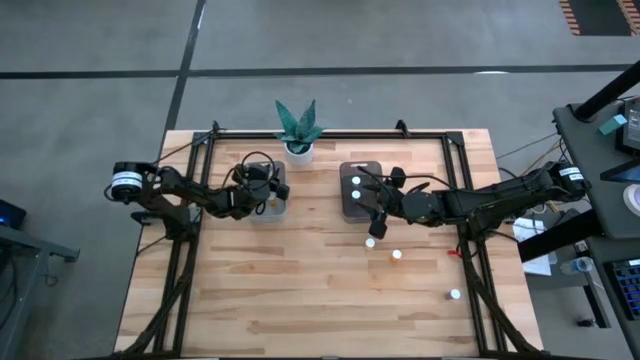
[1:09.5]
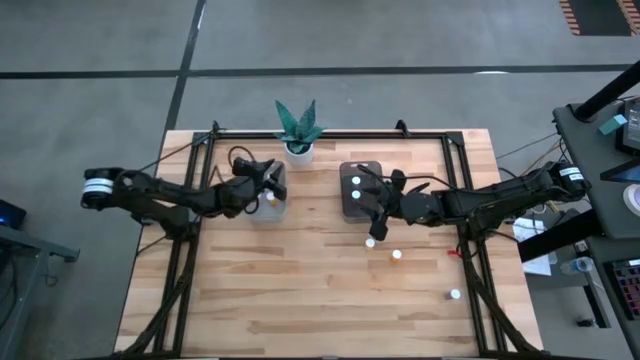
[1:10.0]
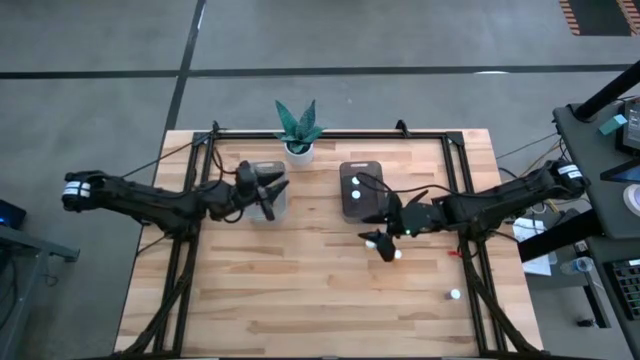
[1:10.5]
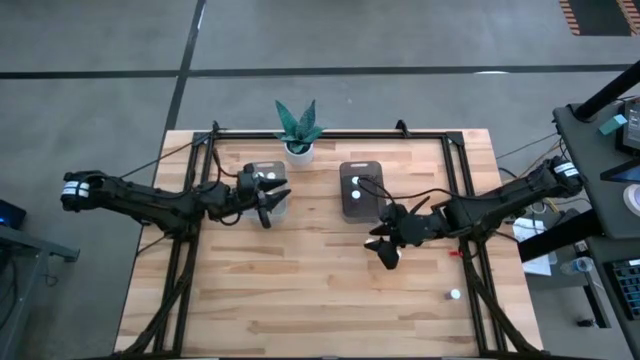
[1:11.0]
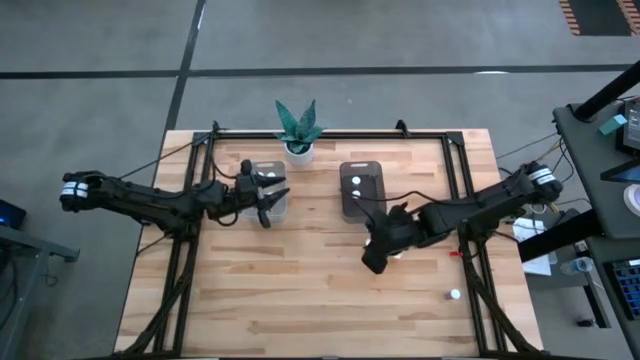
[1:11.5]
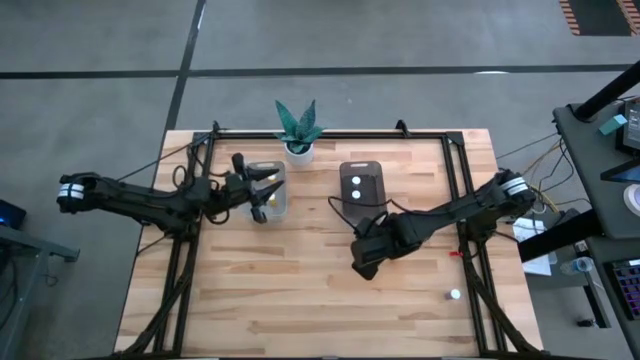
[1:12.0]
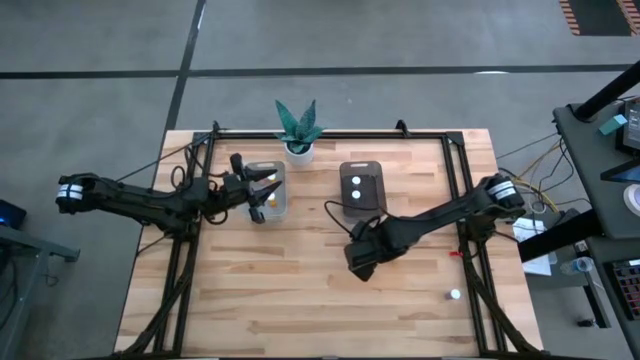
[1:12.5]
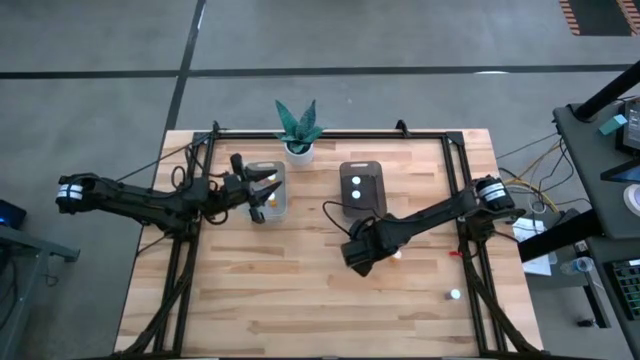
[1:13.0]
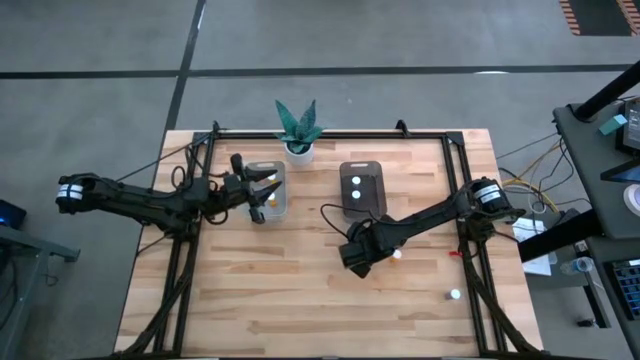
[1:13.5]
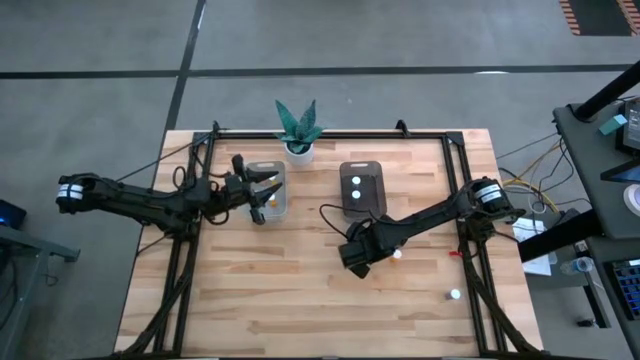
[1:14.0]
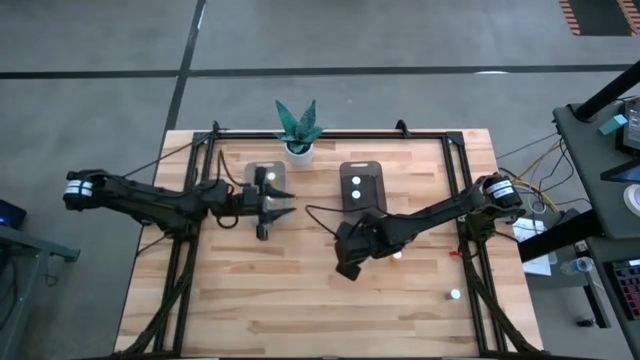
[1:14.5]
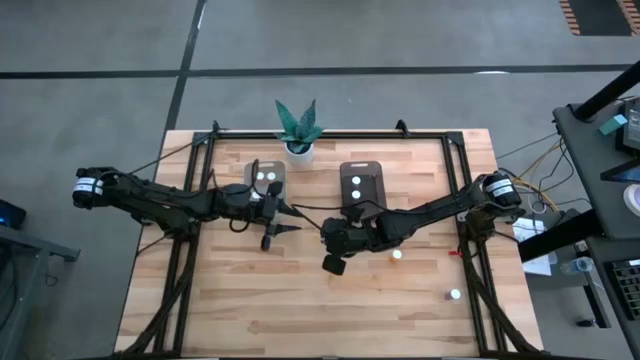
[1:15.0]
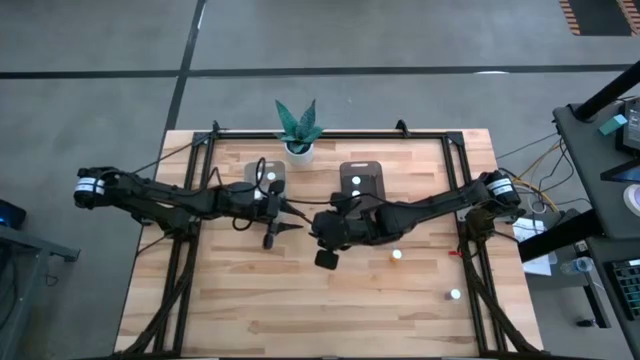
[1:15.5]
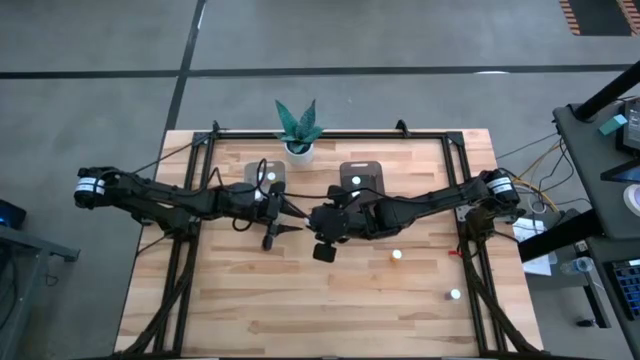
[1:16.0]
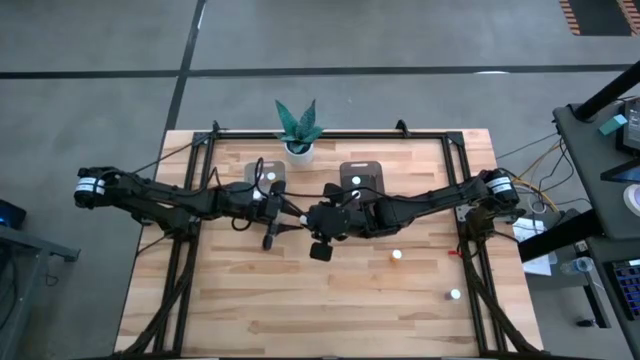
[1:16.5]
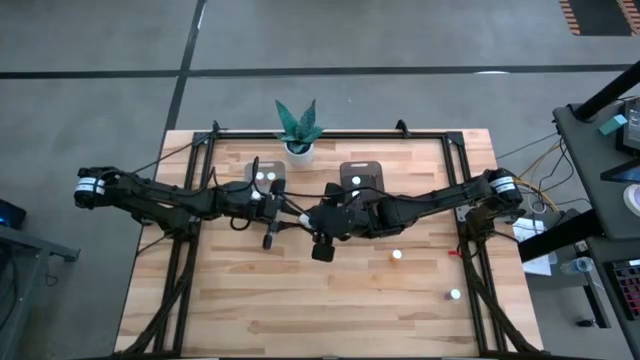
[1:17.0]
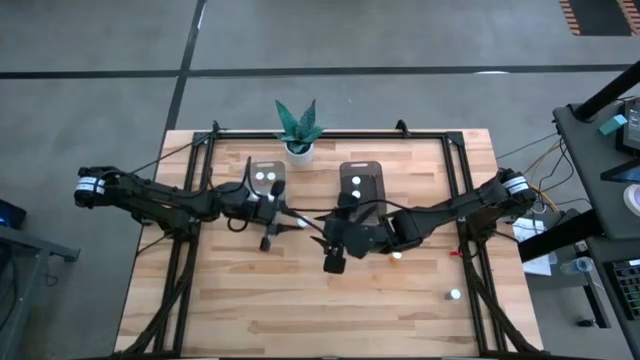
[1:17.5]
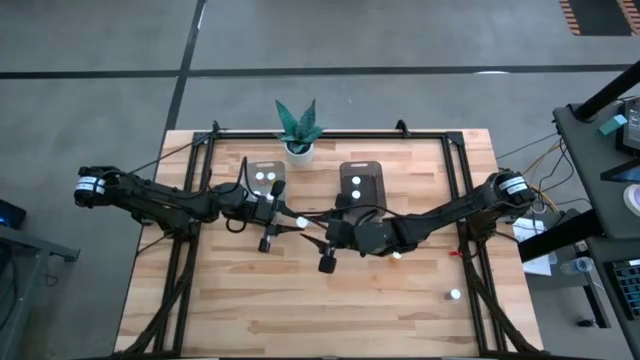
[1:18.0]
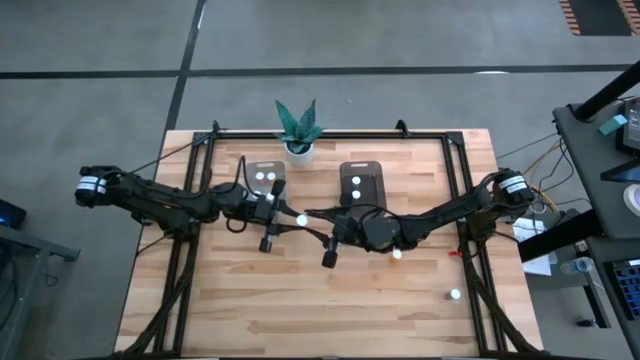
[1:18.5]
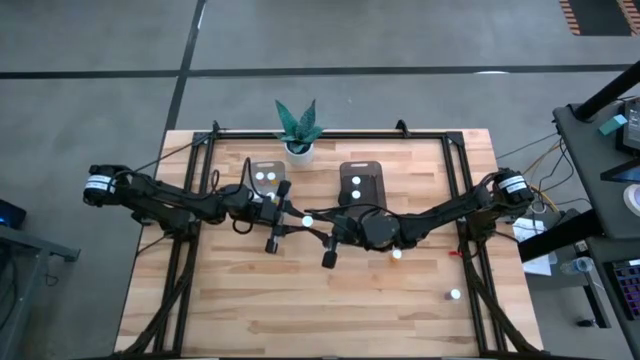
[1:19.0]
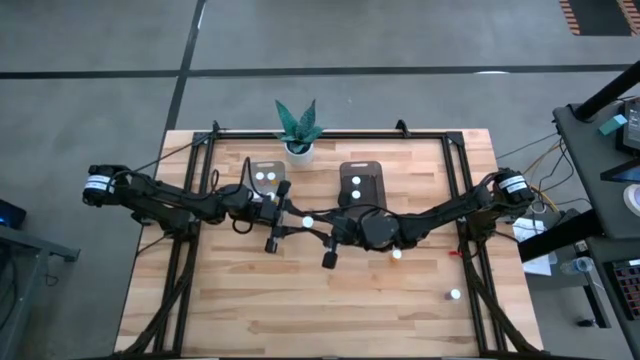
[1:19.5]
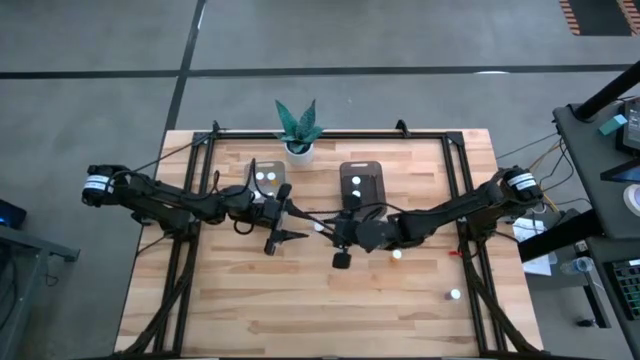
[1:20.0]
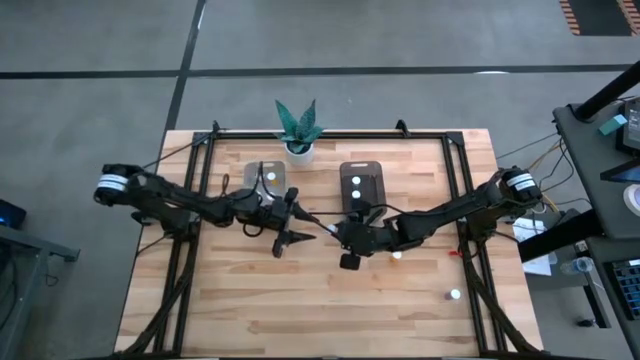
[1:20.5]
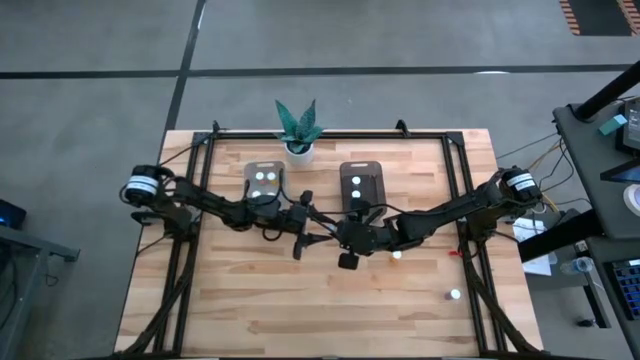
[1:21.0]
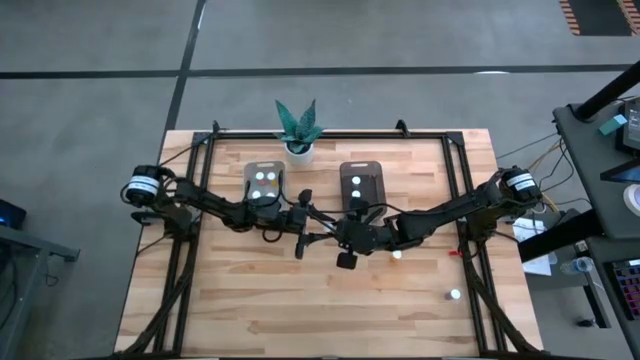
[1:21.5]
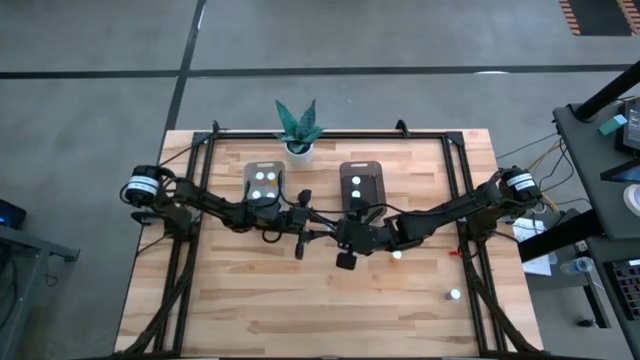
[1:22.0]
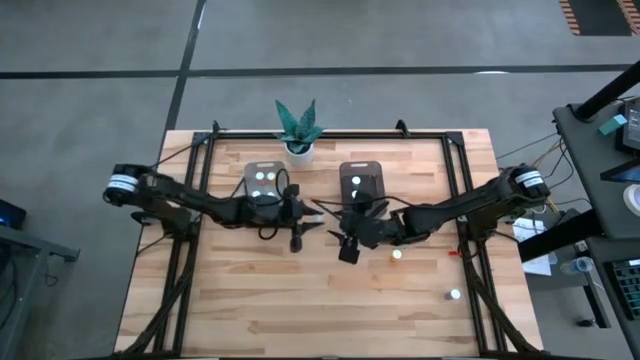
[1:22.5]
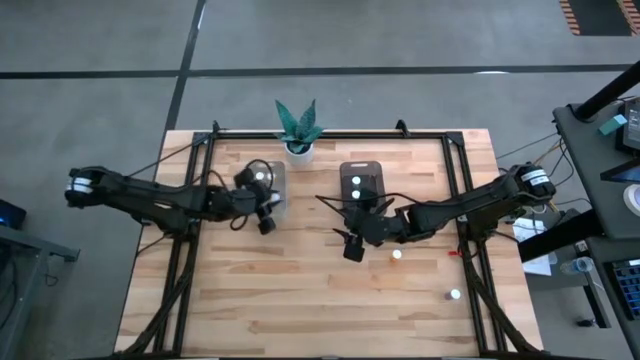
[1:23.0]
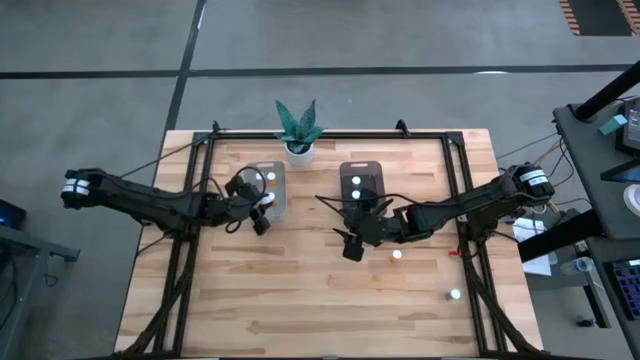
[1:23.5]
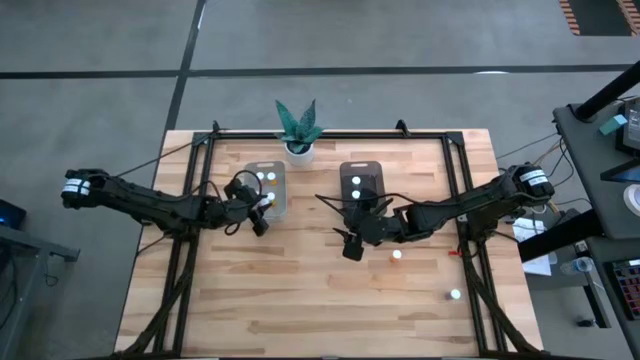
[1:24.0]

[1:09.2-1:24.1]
Task: Pick and place medicine bottles into bin by pill shape (circle, oval)
Put the yellow tablet bottle into the gray bin

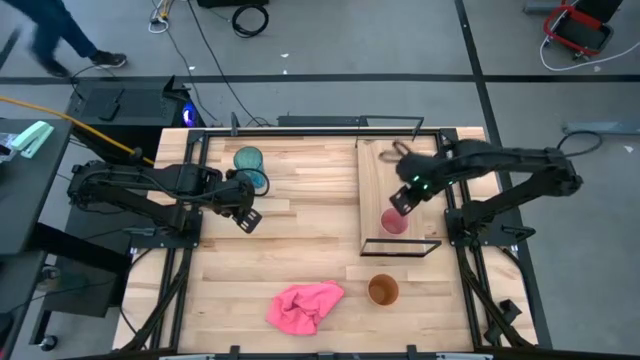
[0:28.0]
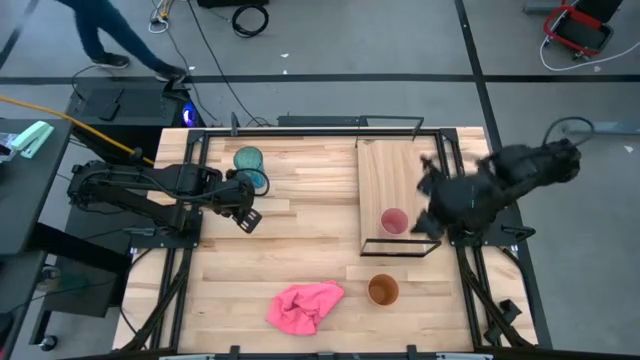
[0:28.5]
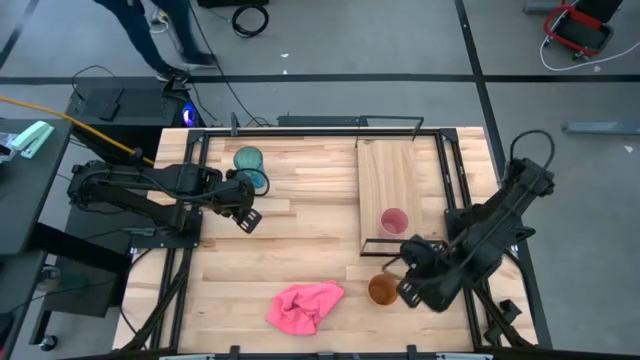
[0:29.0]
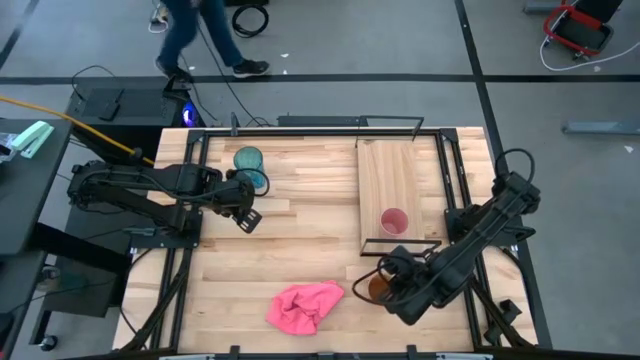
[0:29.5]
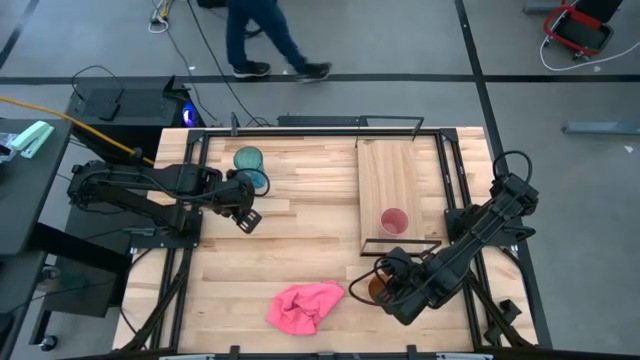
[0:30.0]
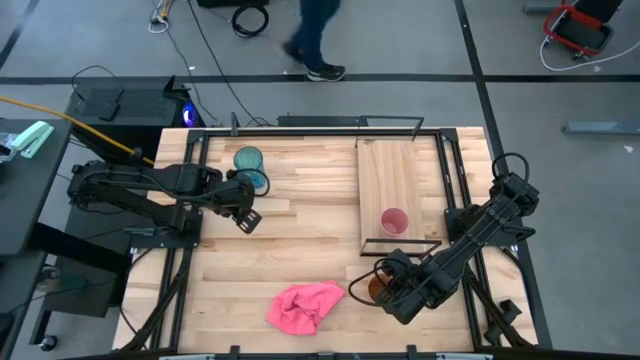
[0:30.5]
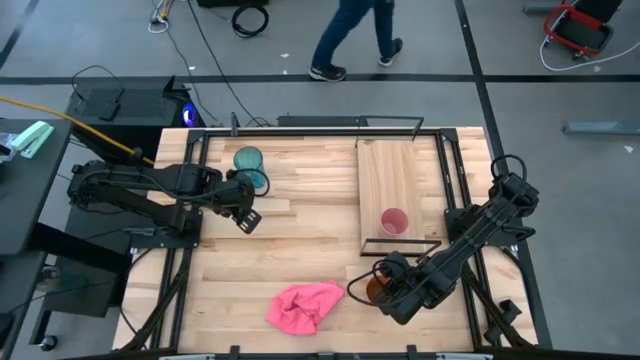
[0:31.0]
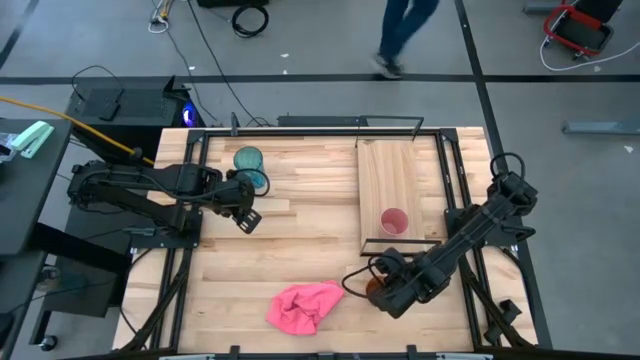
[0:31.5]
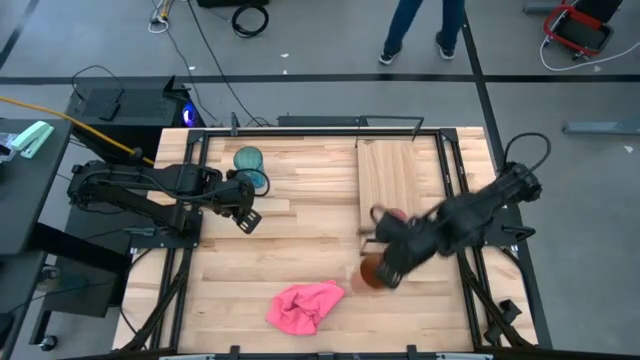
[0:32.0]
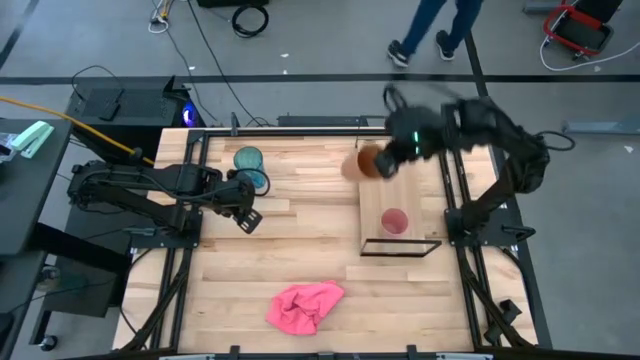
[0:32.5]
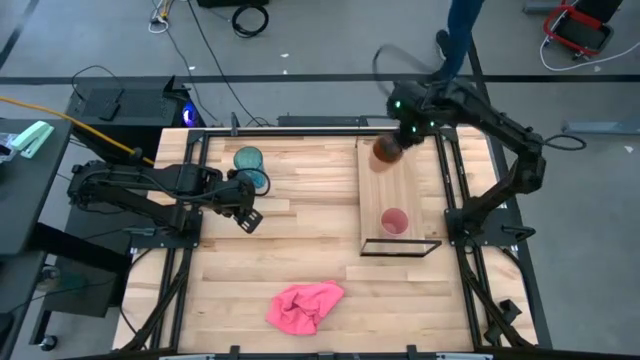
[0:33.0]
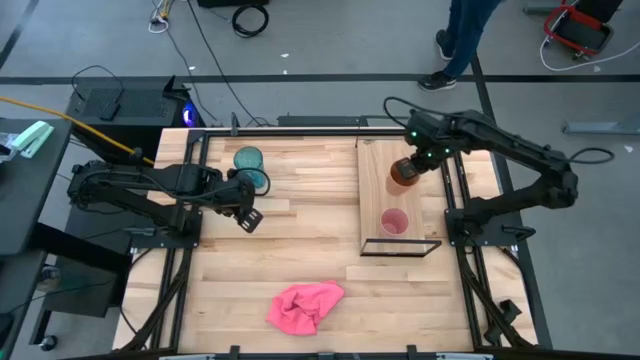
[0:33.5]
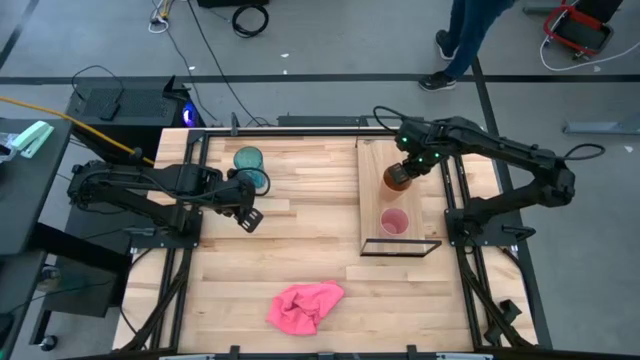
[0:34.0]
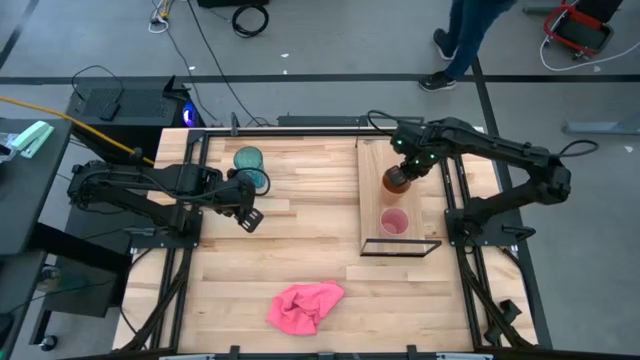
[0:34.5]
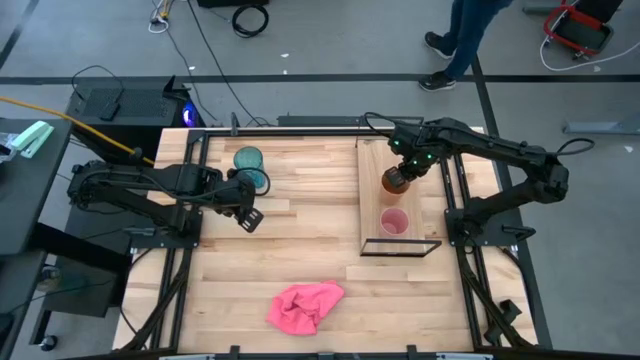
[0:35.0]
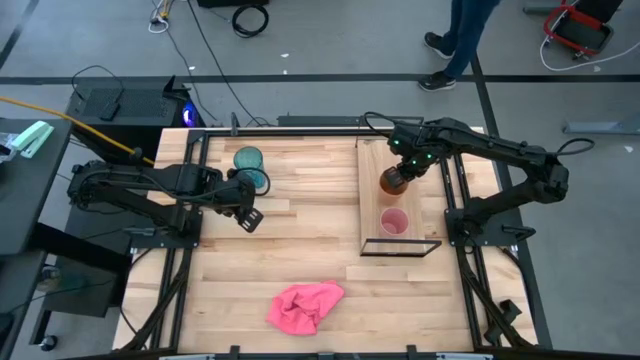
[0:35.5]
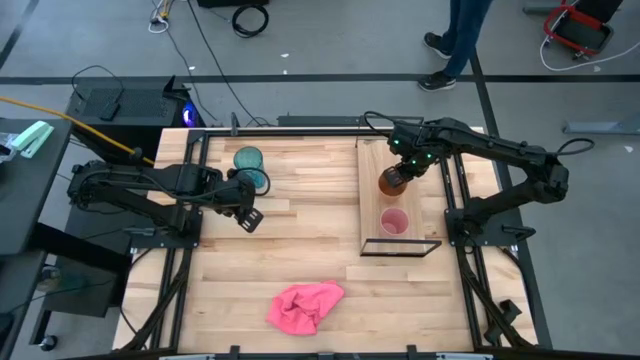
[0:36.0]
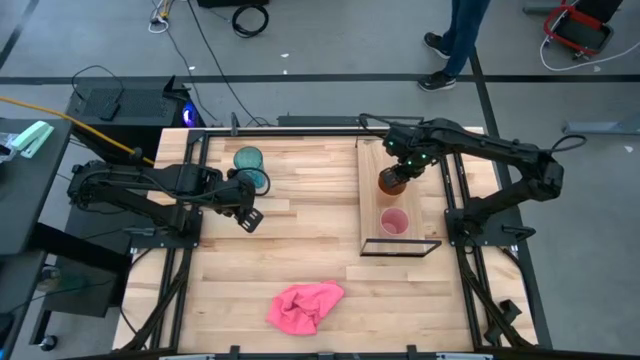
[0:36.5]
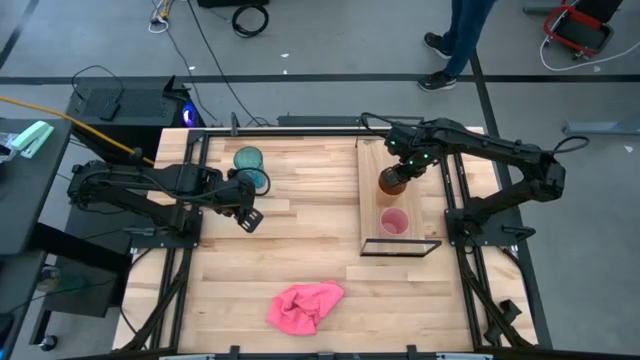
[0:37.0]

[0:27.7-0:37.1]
Task: Stack small to large cups/mugs on shelf
Put the orange cup on the shelf
